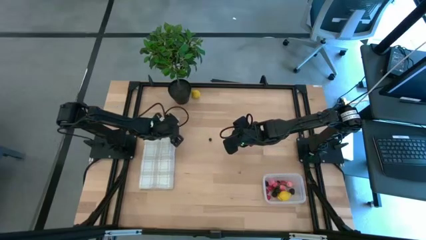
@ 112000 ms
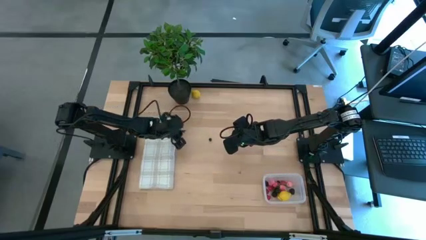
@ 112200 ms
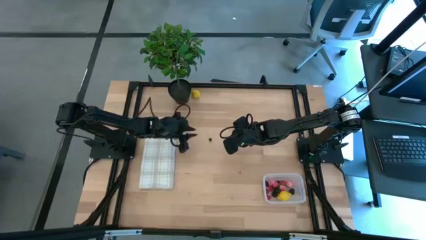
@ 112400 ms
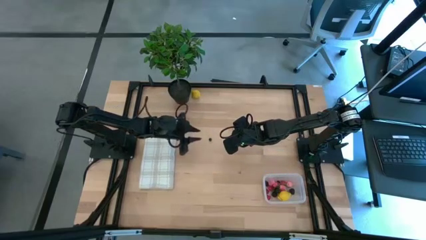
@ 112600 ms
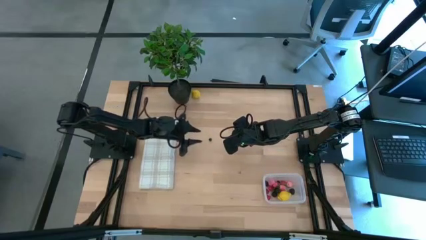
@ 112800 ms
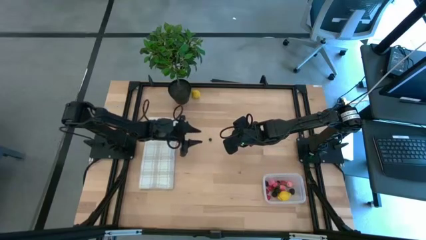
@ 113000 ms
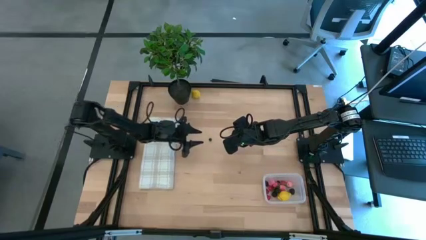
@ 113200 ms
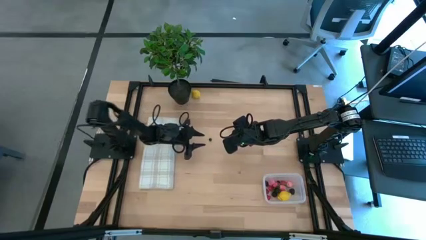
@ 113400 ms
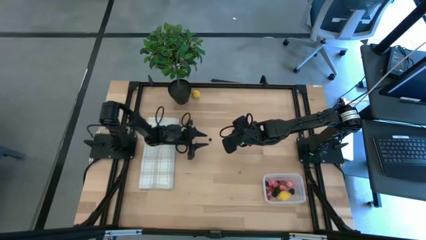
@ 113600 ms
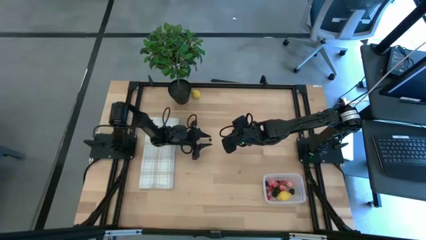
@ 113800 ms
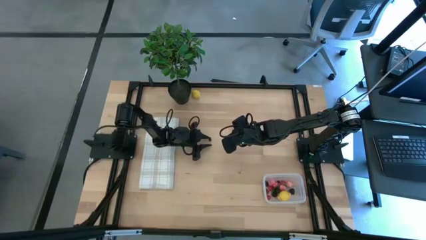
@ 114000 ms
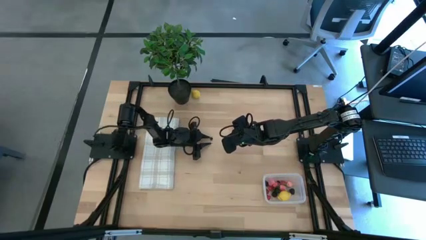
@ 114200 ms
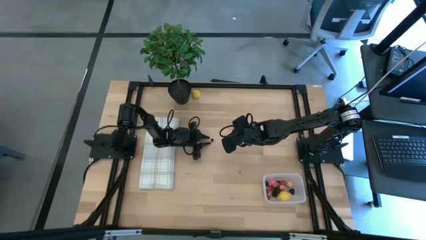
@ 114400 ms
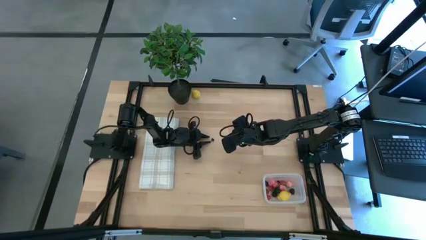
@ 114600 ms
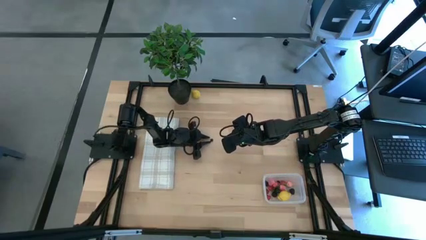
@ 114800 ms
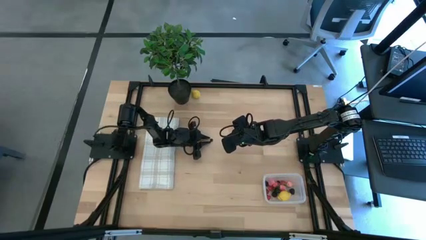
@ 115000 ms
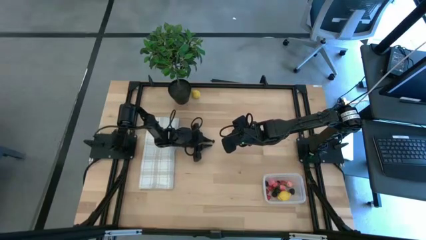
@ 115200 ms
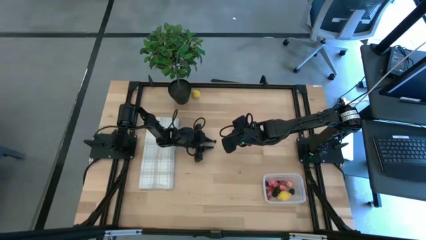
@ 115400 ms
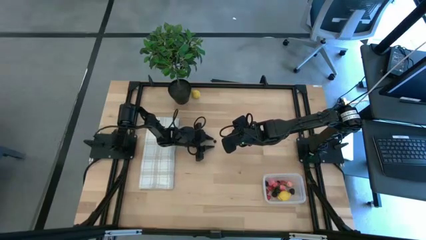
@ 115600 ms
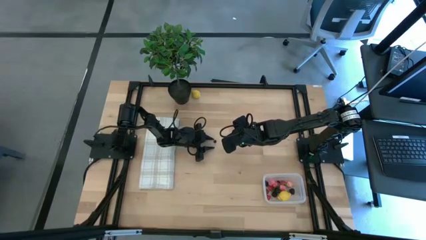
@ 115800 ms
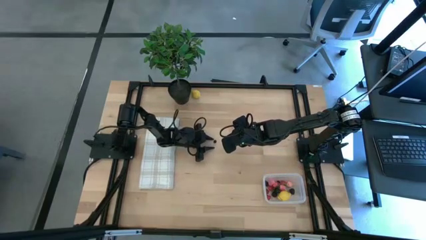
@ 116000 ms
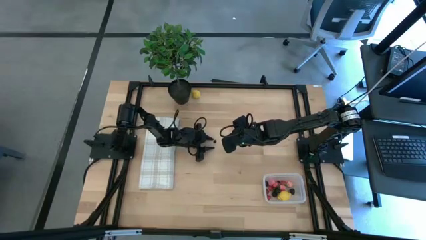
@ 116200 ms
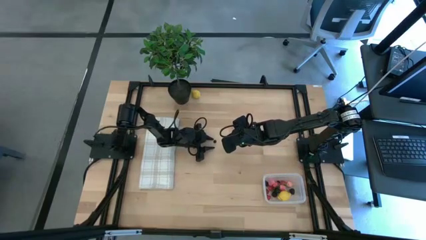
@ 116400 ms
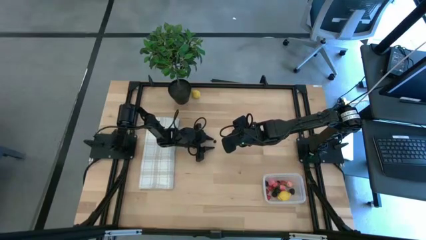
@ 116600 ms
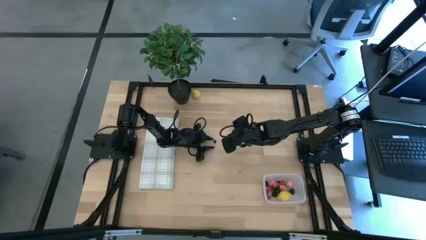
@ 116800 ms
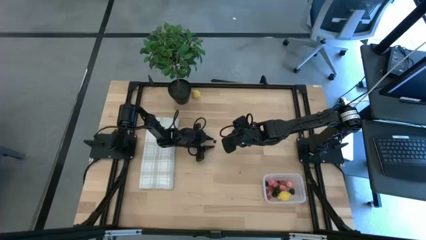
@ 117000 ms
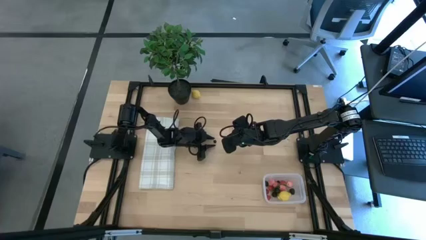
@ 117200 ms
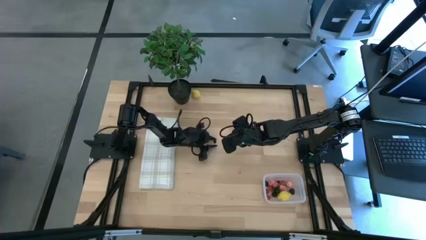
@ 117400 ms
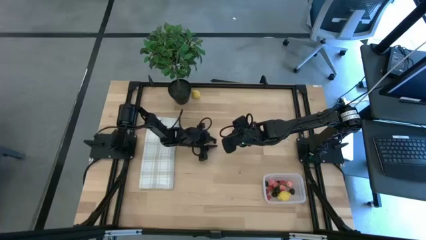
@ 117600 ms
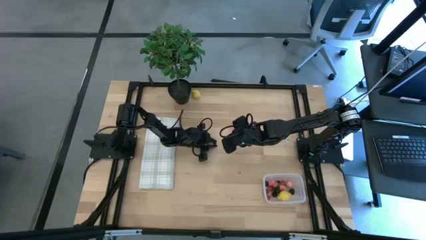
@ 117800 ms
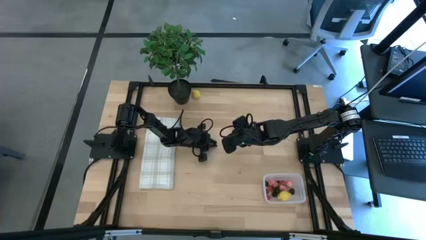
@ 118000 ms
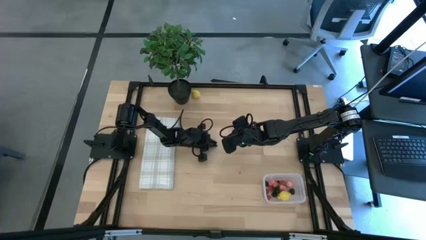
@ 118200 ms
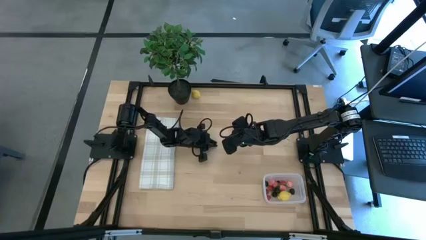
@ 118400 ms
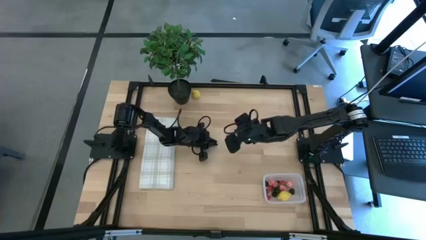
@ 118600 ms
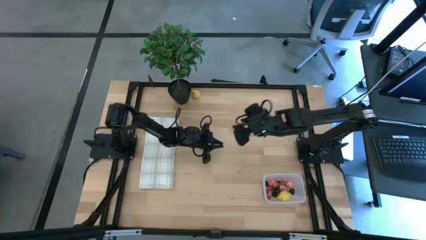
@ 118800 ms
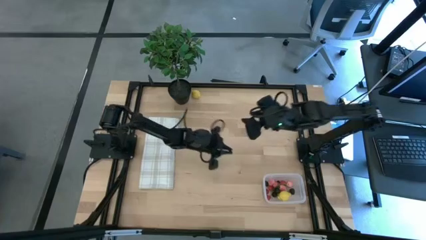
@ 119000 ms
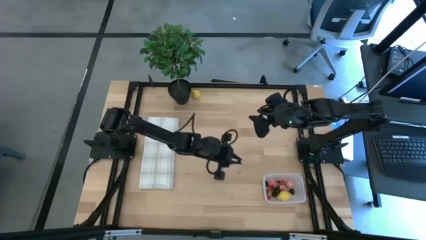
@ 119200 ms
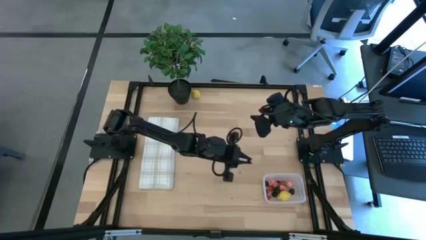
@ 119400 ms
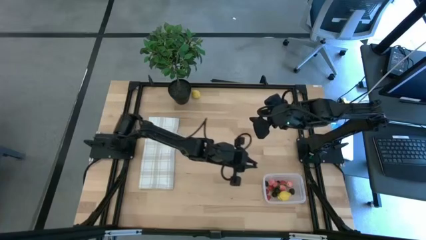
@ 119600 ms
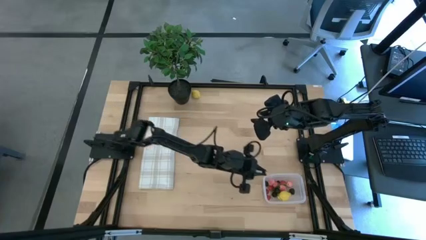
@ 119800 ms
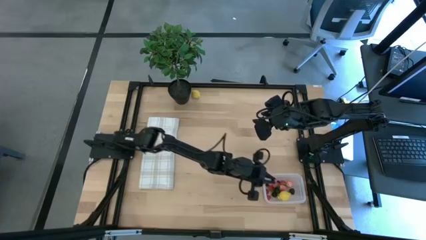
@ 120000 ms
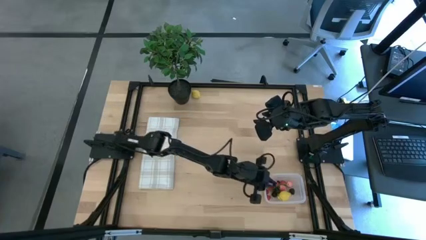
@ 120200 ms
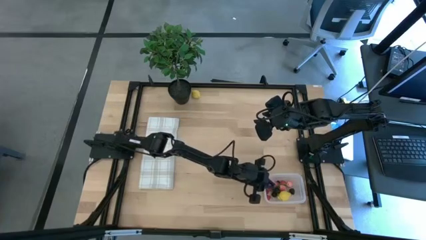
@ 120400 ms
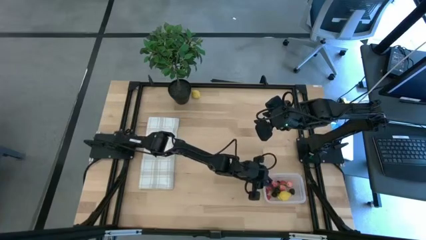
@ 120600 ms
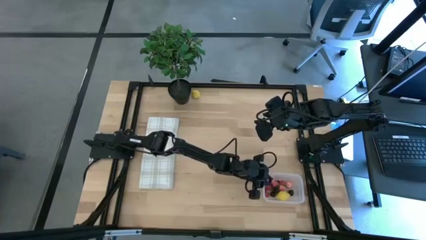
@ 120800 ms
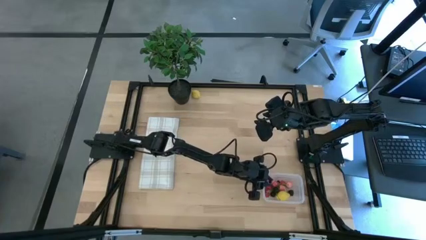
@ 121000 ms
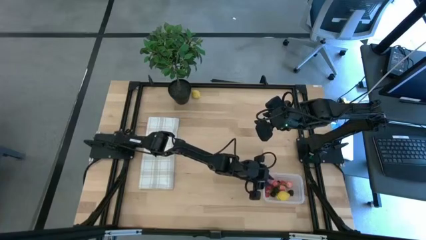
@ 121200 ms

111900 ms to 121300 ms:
Task: Pick and placing Produce into tupperware
Put the black cherry into the transparent bin
